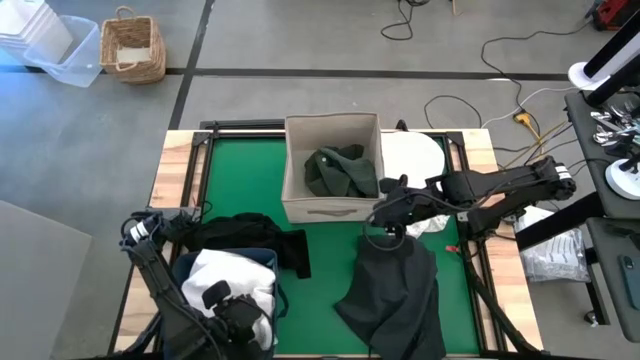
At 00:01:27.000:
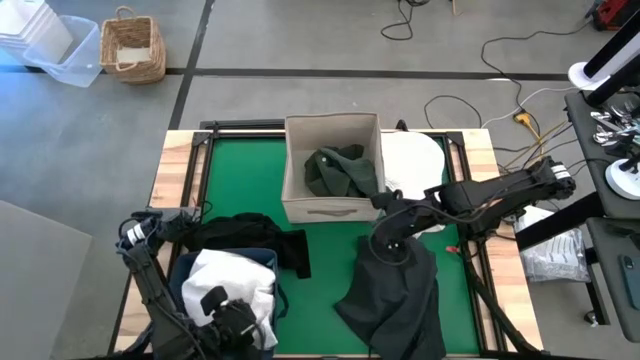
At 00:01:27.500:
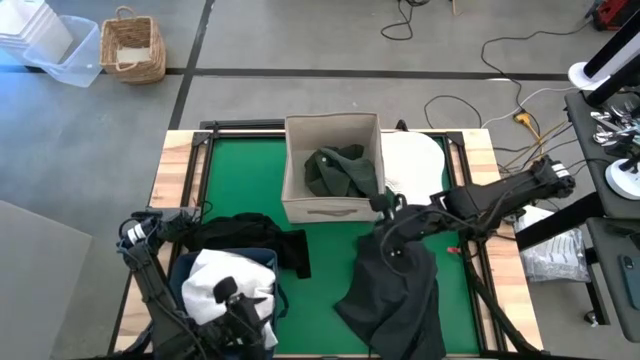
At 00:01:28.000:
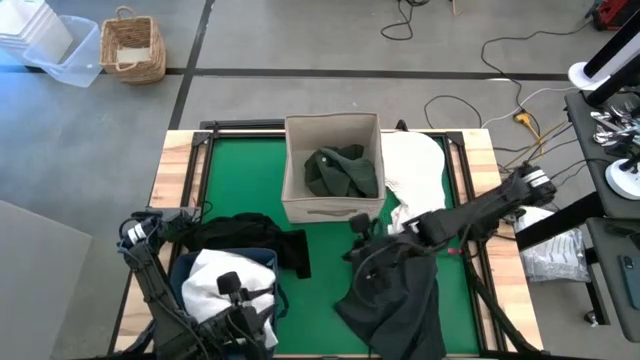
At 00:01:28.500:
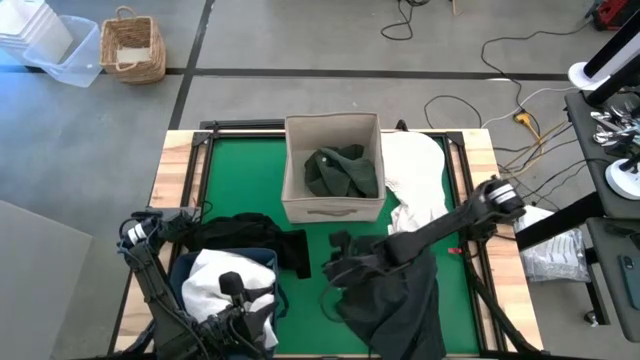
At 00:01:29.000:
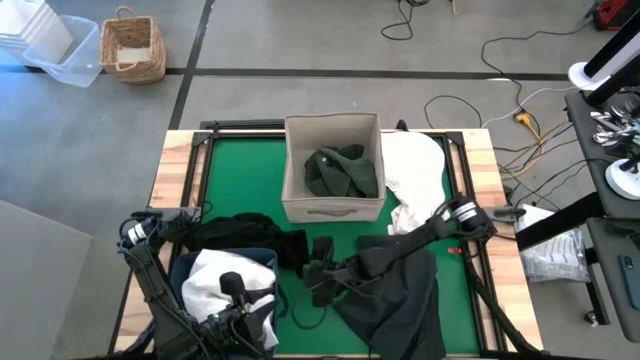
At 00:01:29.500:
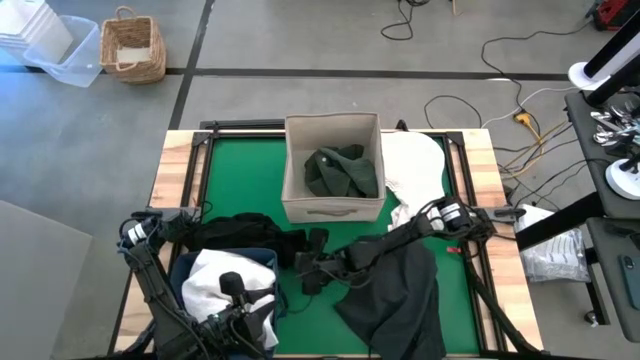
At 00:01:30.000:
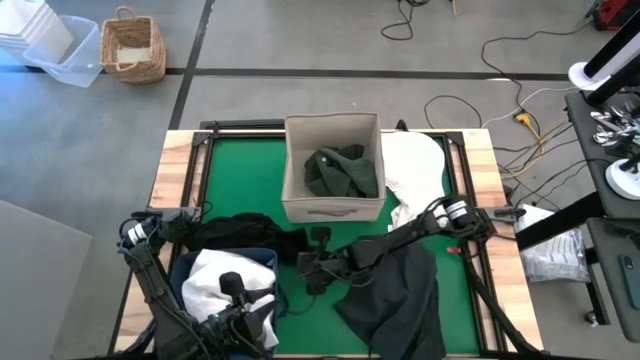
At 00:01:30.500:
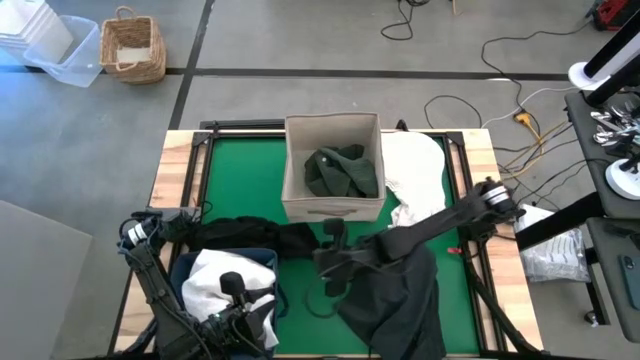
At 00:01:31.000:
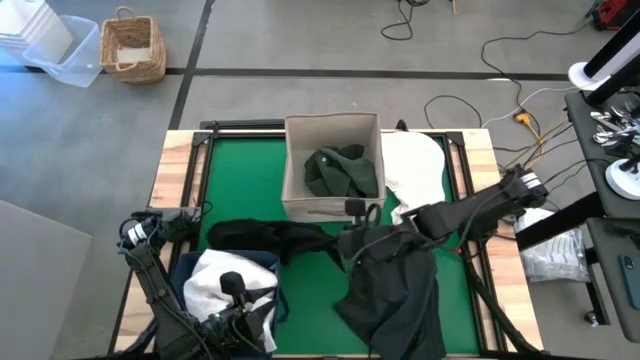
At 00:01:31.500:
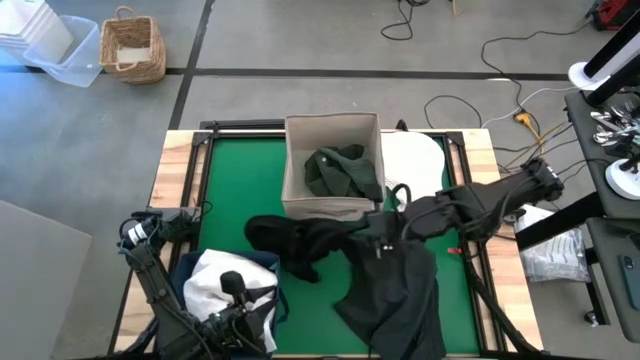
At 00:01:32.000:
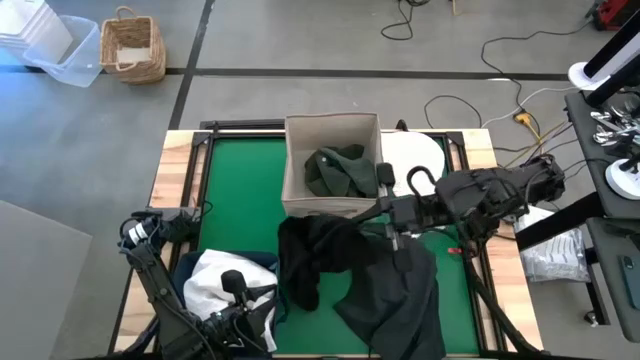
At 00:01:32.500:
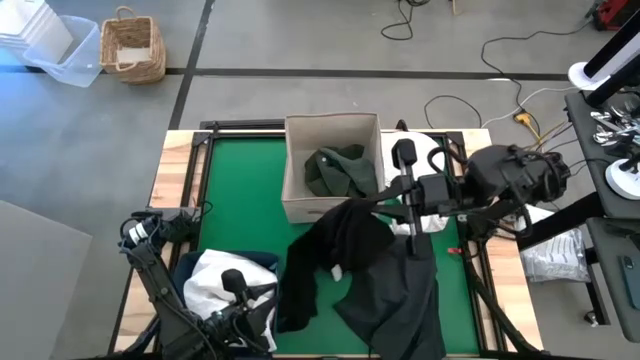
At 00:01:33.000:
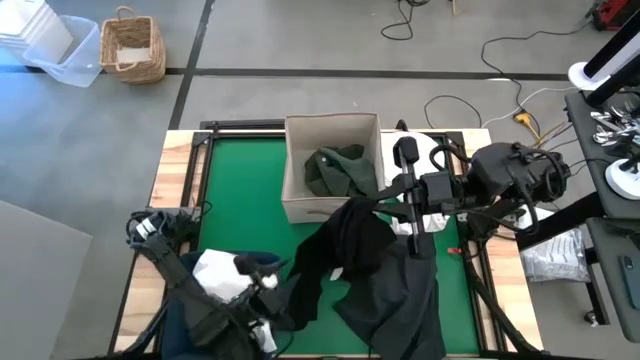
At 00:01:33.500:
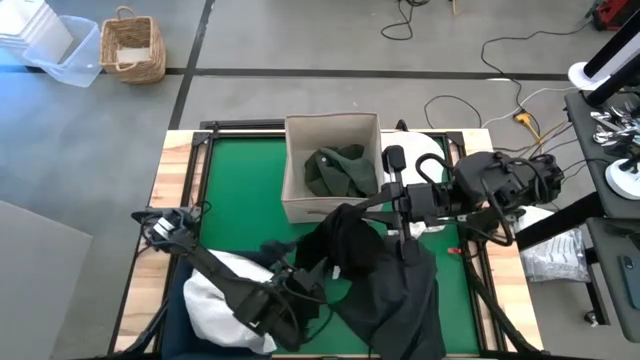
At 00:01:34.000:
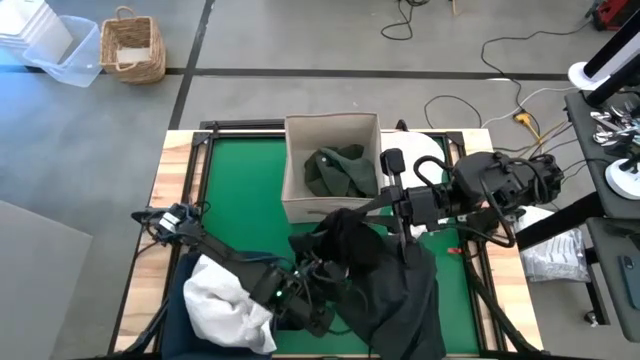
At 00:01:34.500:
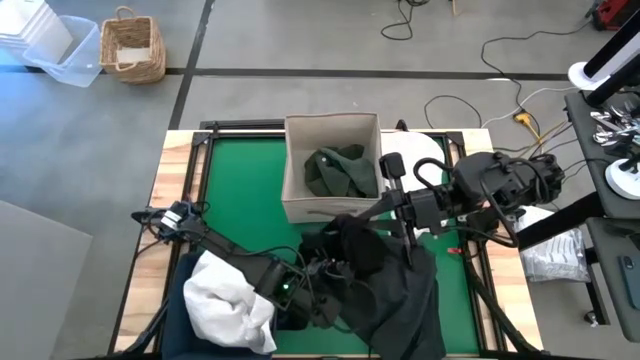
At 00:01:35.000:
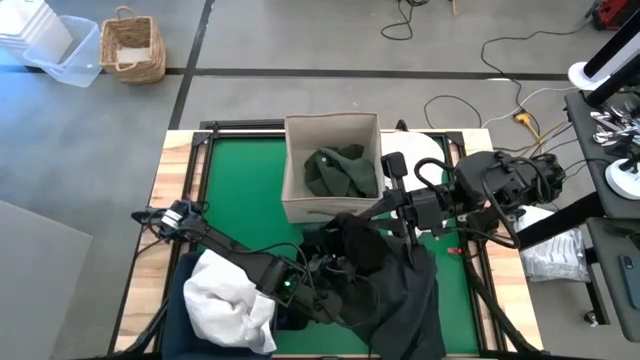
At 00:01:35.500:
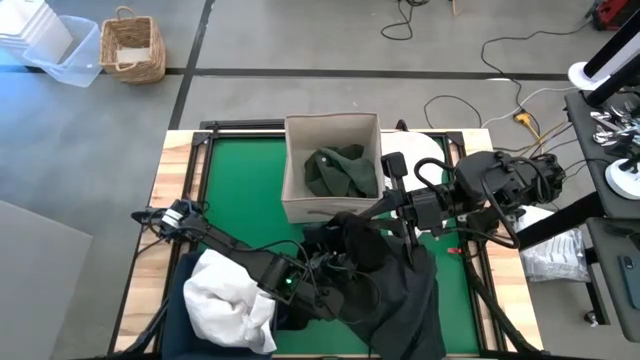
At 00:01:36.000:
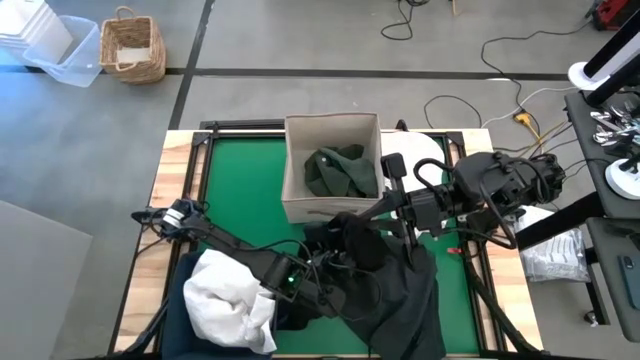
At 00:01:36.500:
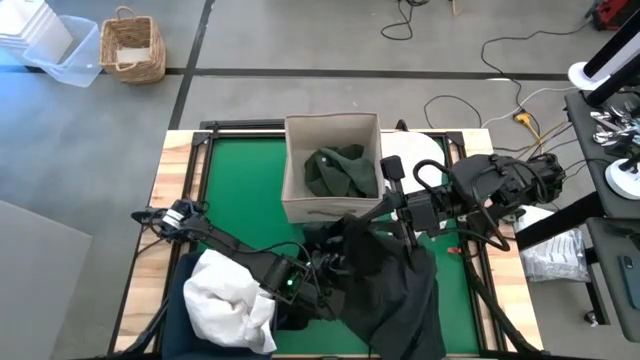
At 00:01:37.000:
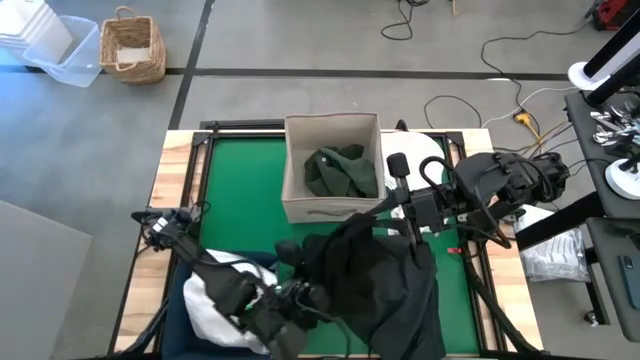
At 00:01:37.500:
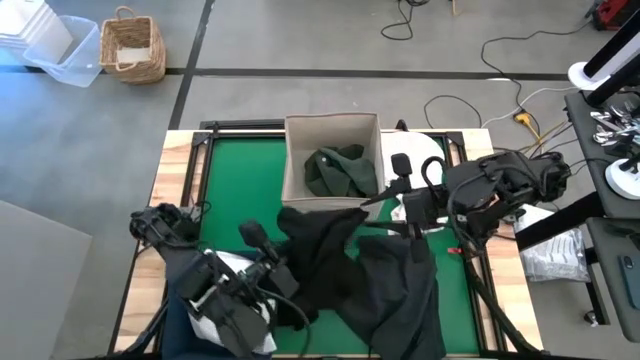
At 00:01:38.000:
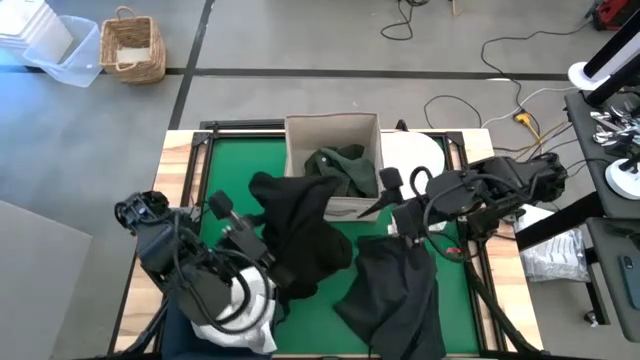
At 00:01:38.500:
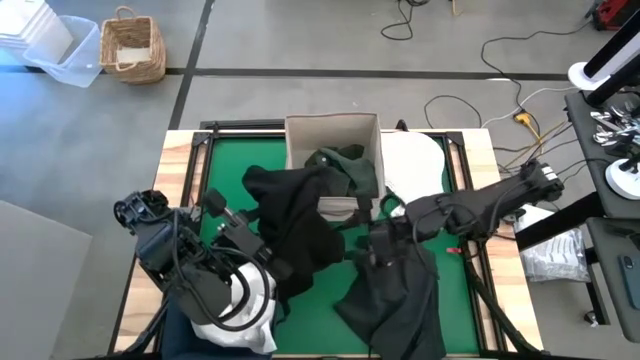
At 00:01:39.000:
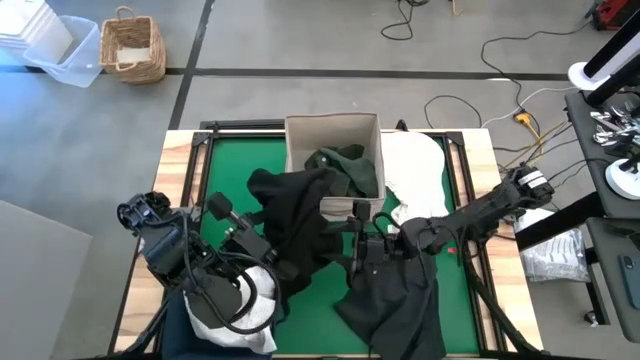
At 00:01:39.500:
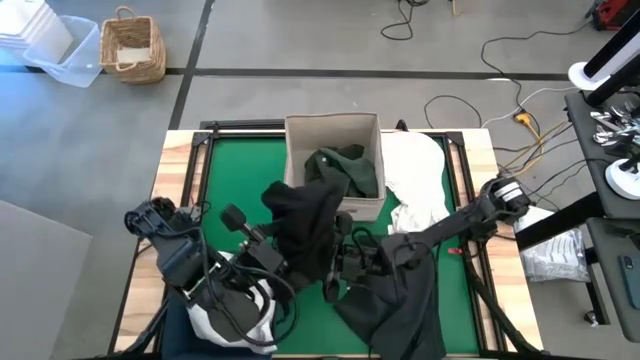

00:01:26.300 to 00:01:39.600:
Put the black shirt into the brown laundry bin

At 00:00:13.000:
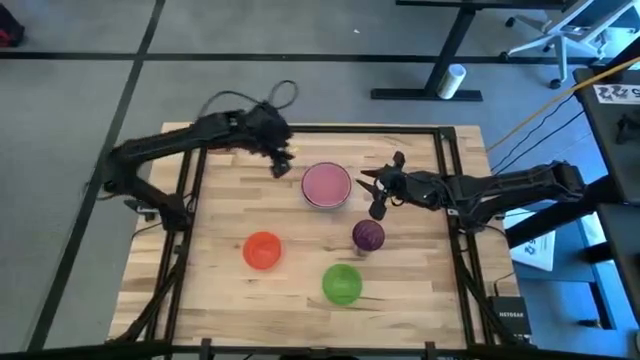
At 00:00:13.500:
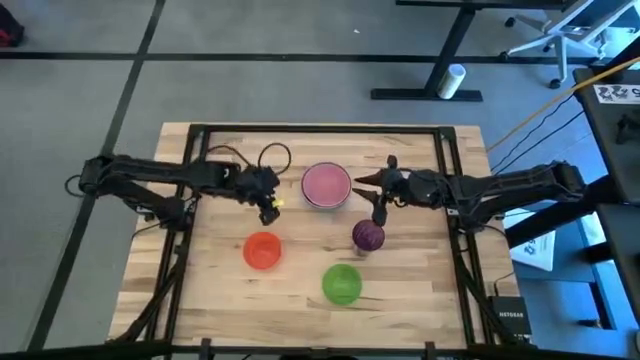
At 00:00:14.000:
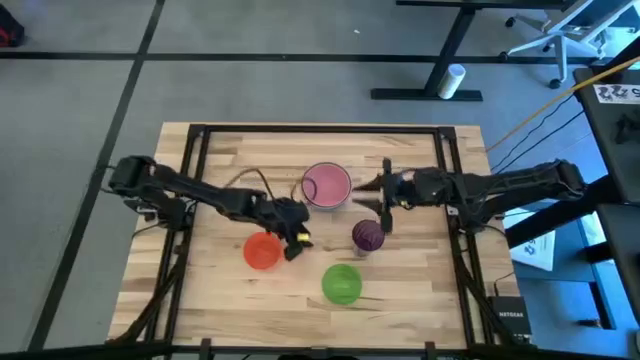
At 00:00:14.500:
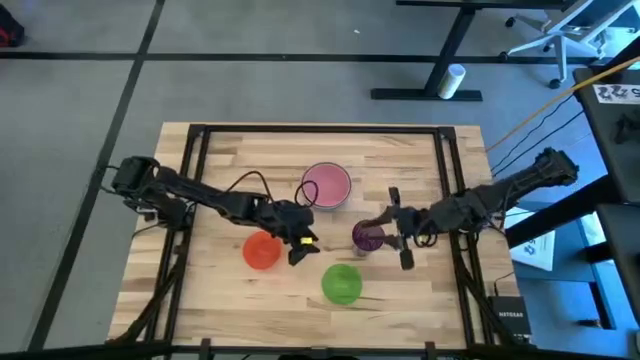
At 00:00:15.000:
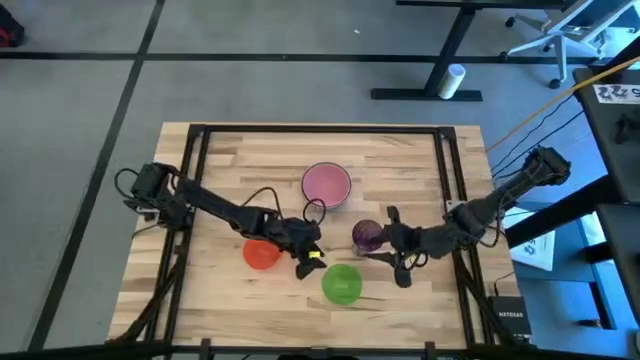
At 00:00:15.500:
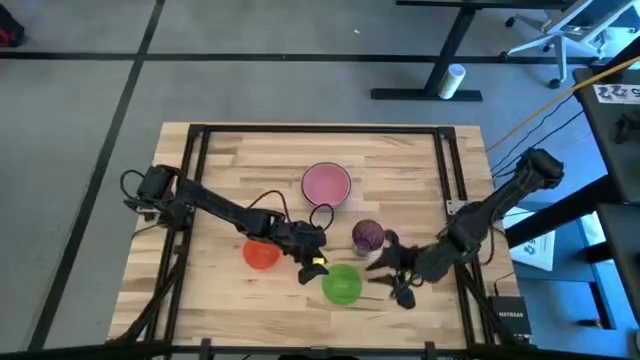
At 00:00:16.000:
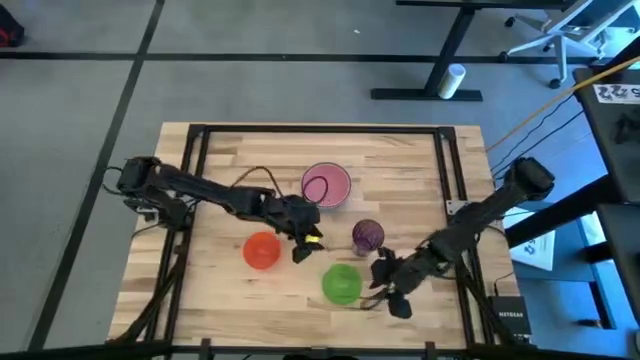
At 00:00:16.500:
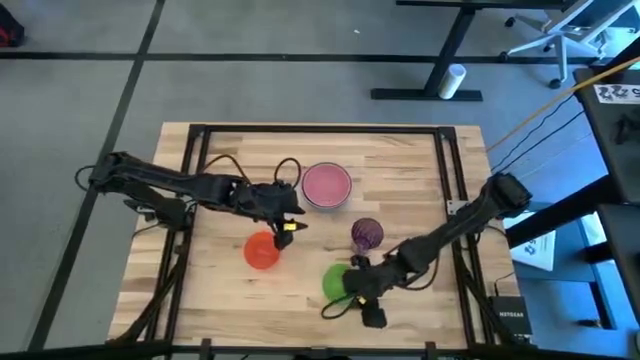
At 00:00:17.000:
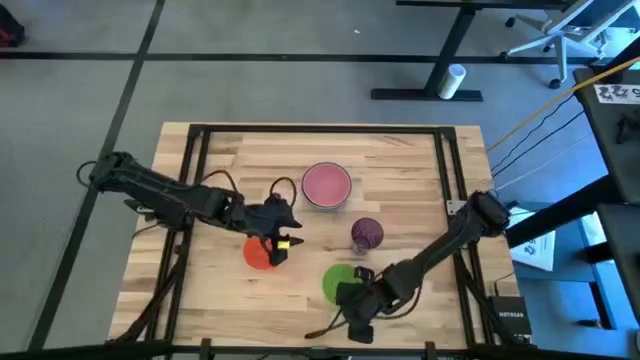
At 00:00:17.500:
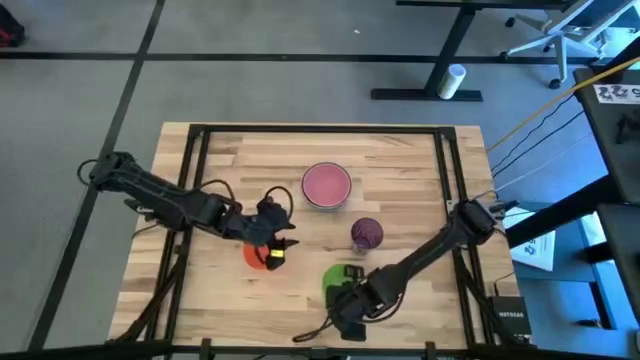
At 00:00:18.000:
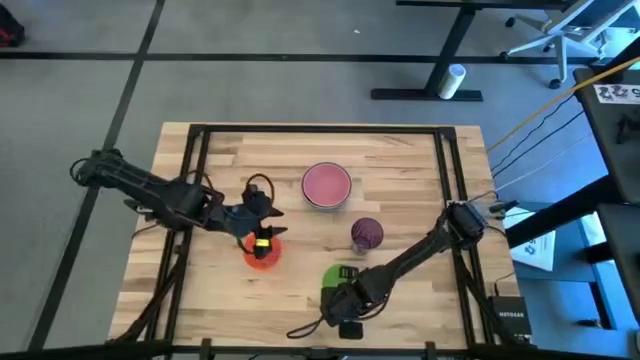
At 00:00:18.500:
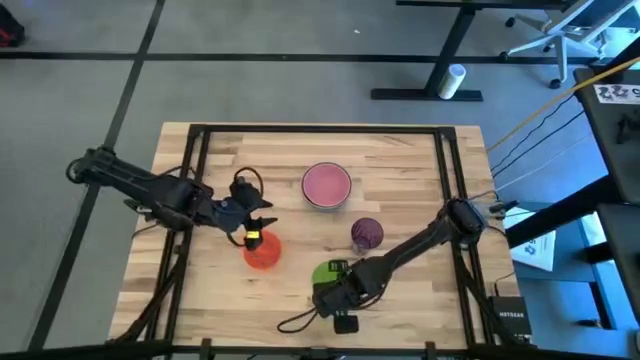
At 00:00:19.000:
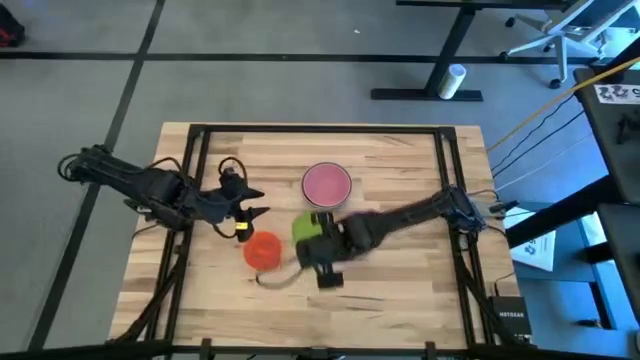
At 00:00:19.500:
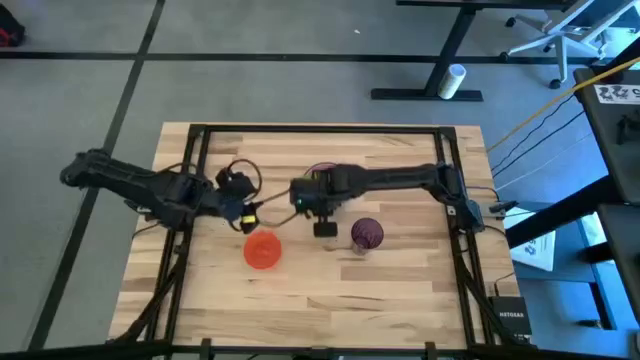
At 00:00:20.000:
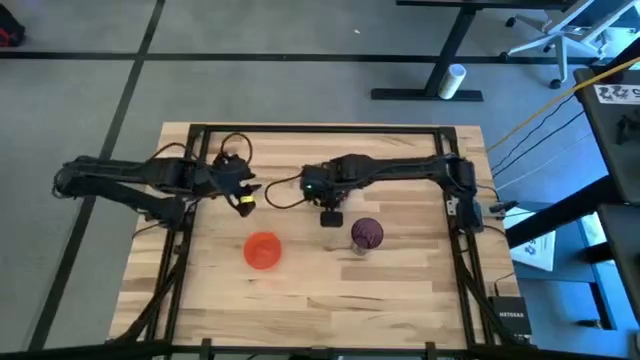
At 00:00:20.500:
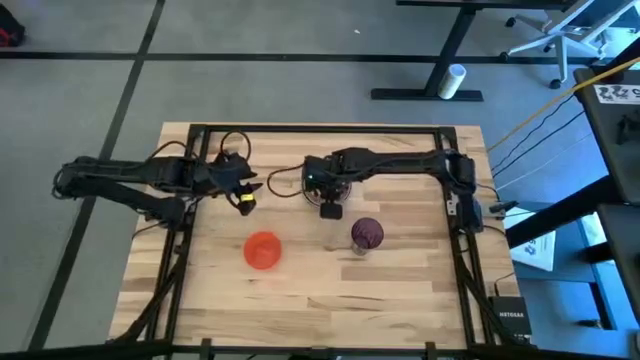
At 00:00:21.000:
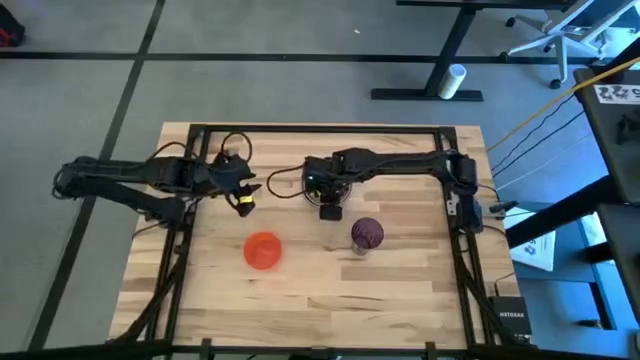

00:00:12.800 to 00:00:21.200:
Stack the green bowl on top of the pink bowl
